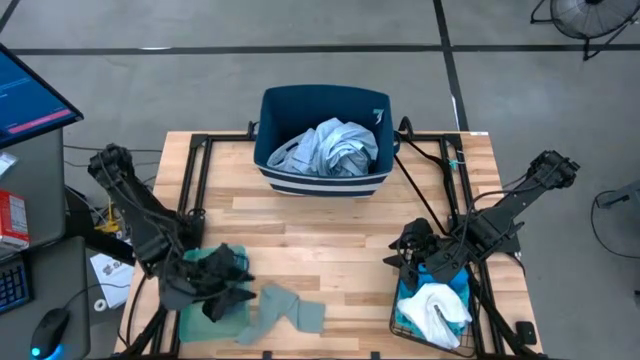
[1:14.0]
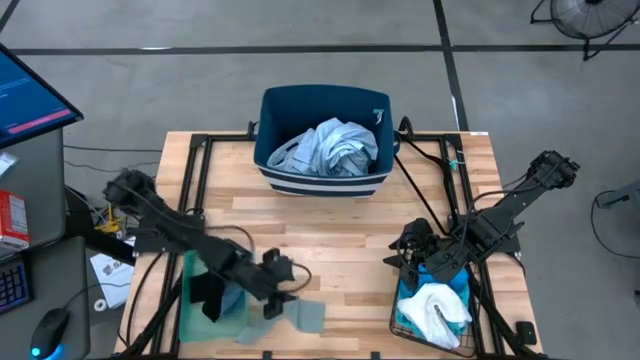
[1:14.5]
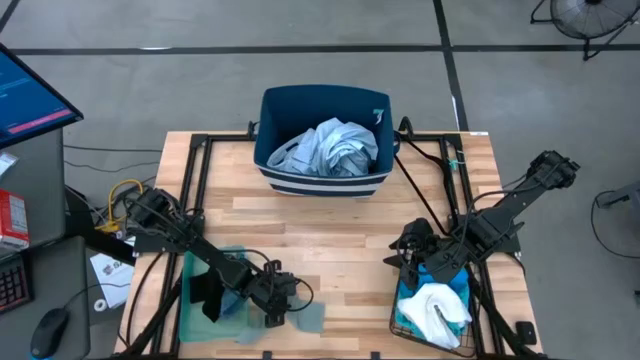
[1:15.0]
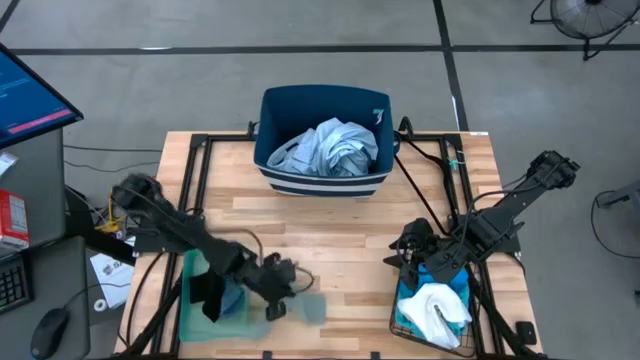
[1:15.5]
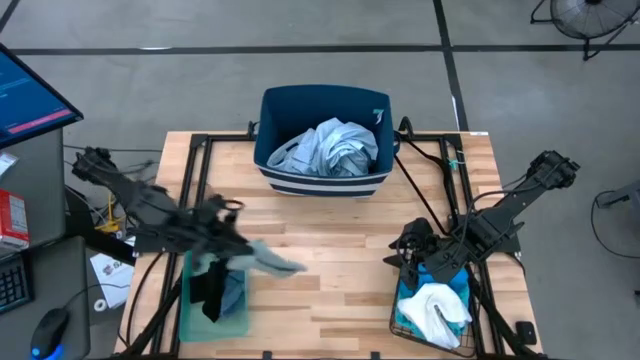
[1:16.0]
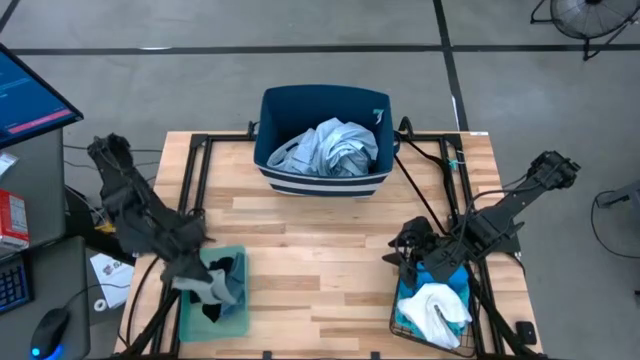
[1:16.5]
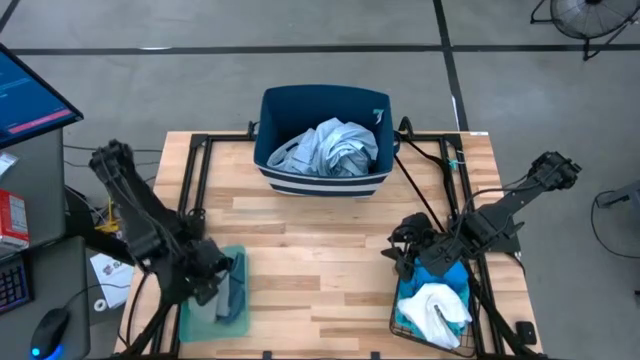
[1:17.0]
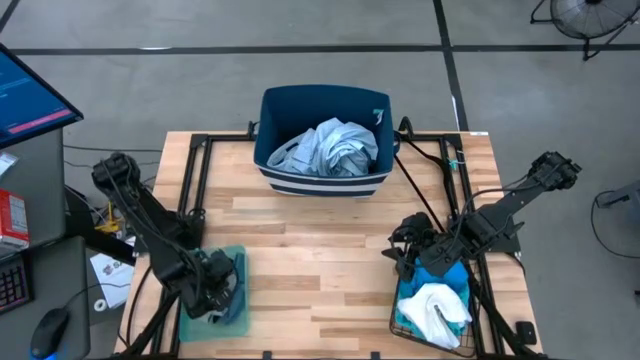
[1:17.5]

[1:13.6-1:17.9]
Task: Pick & Place Cloths
Put the gray sock into the green bin

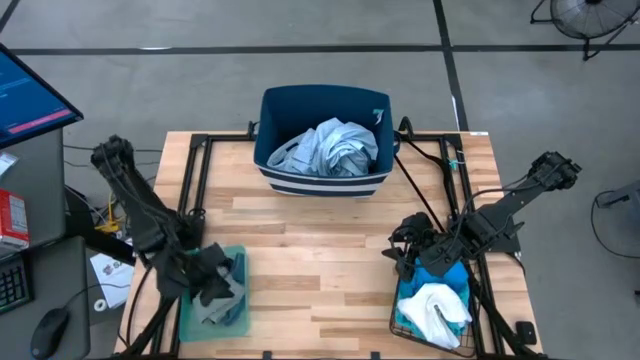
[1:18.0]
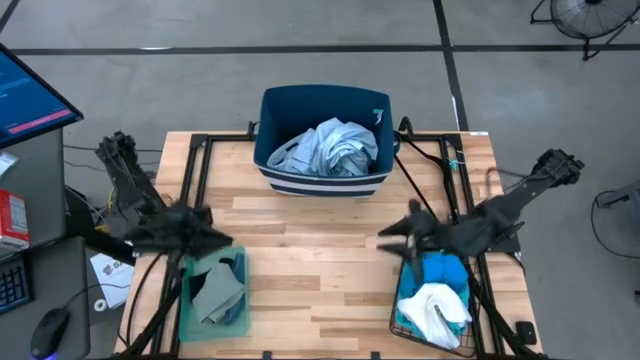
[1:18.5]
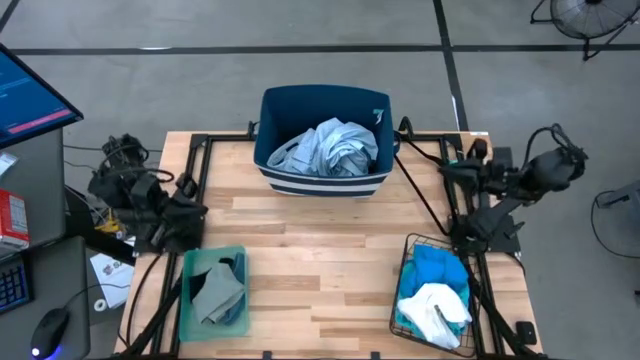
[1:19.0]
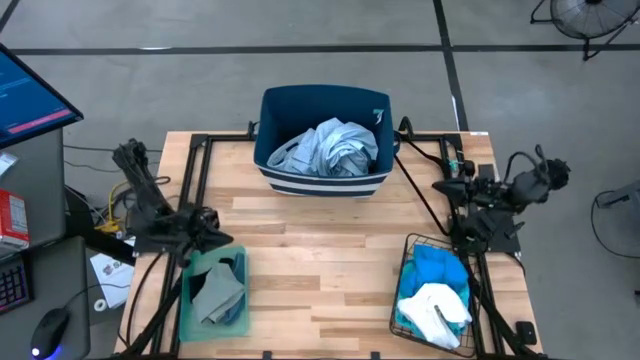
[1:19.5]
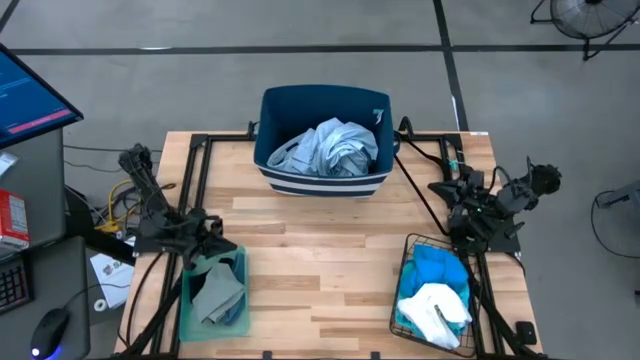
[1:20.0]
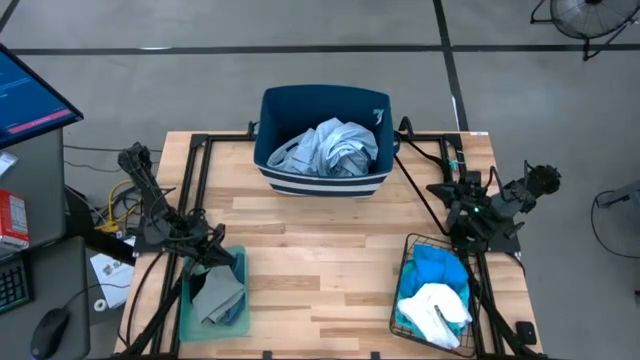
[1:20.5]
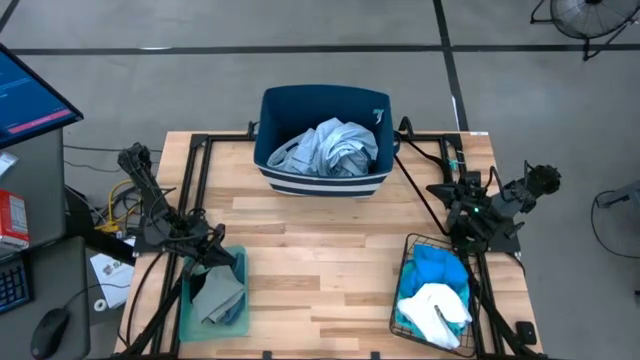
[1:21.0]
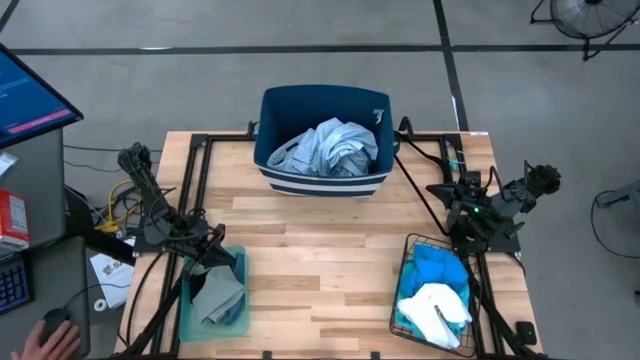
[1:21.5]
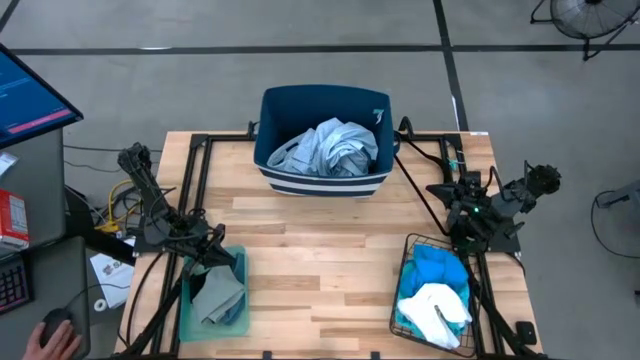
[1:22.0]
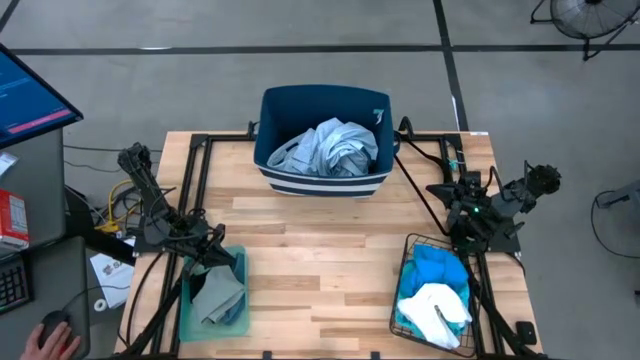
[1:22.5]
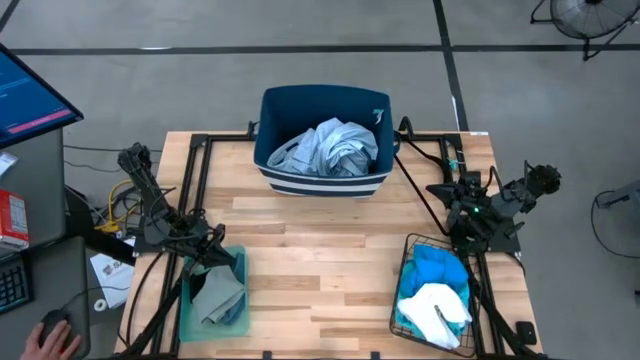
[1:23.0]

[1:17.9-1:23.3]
Return to Home Position

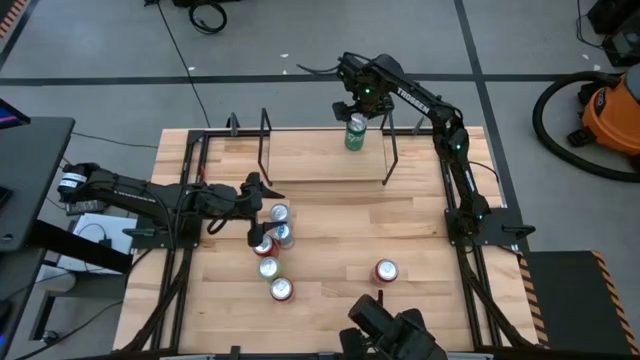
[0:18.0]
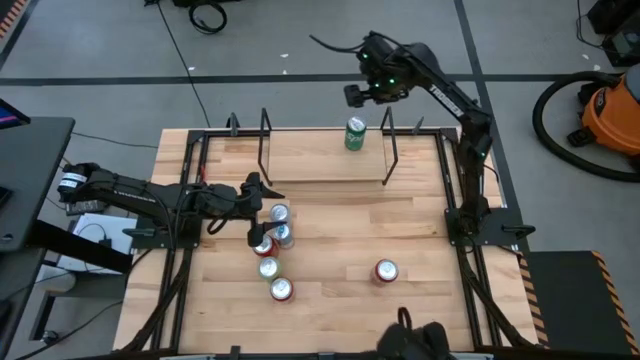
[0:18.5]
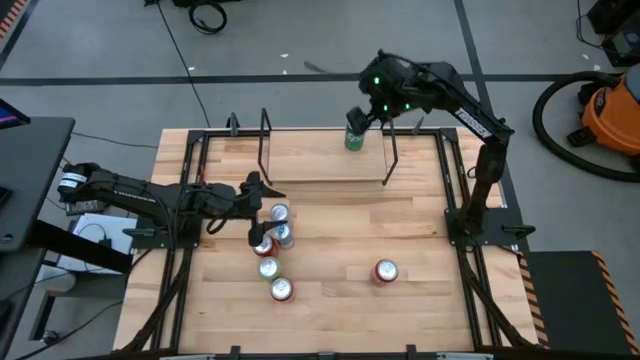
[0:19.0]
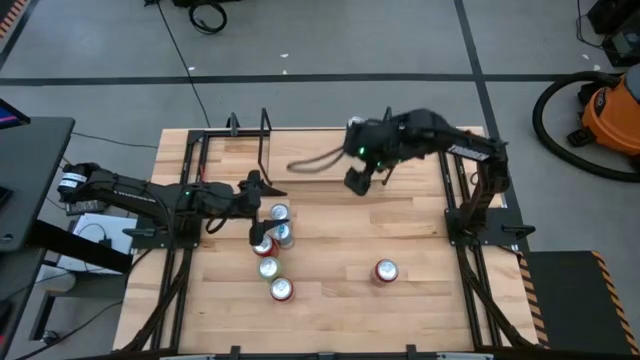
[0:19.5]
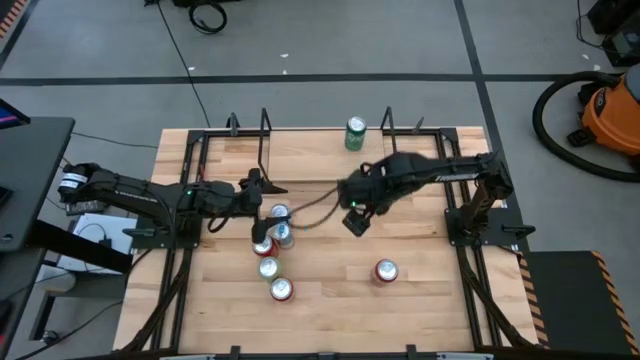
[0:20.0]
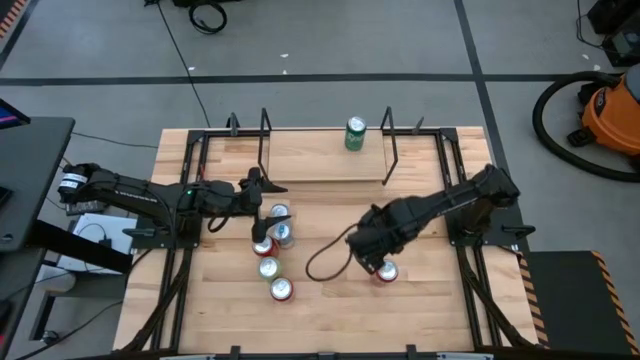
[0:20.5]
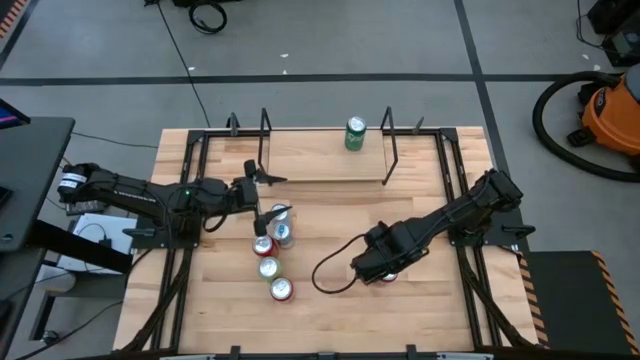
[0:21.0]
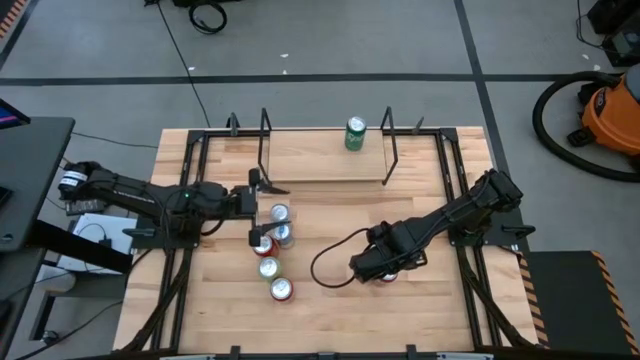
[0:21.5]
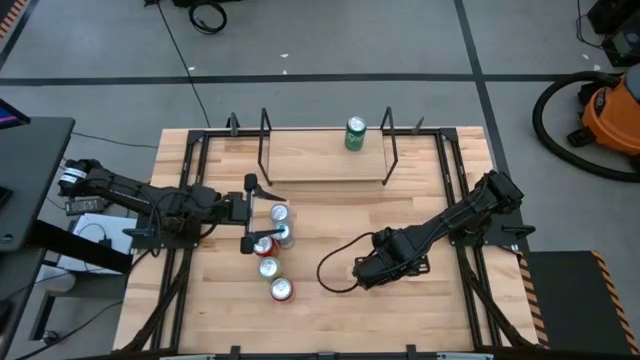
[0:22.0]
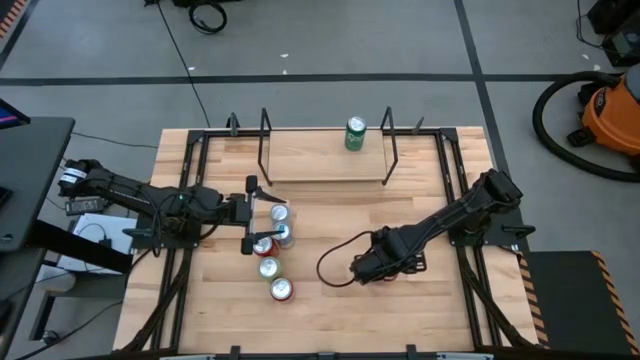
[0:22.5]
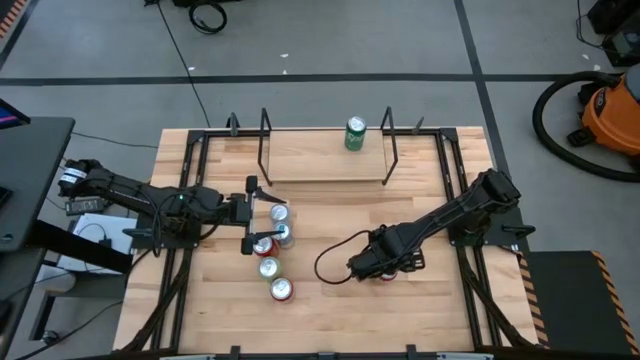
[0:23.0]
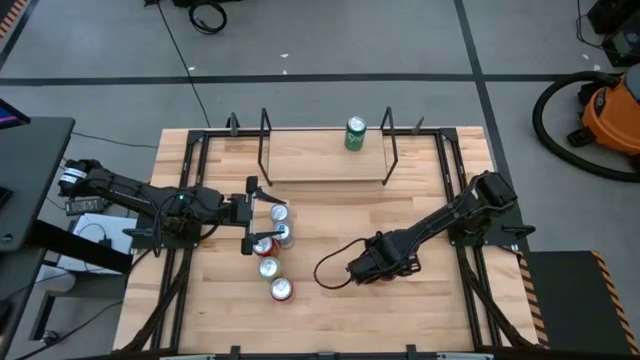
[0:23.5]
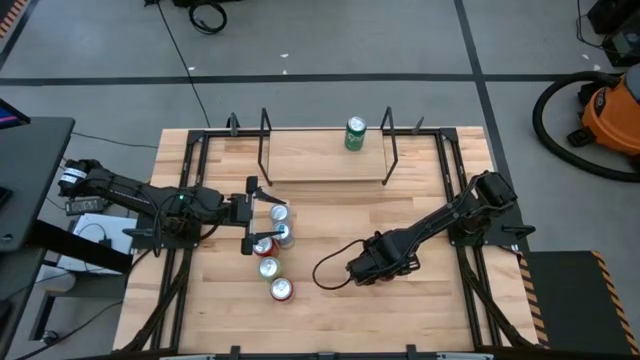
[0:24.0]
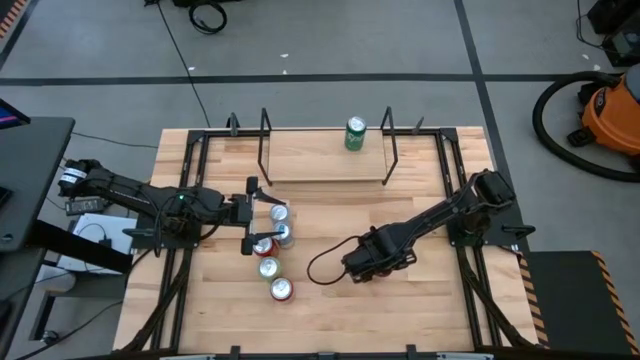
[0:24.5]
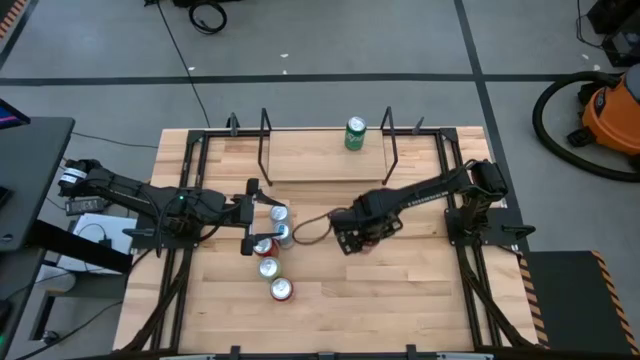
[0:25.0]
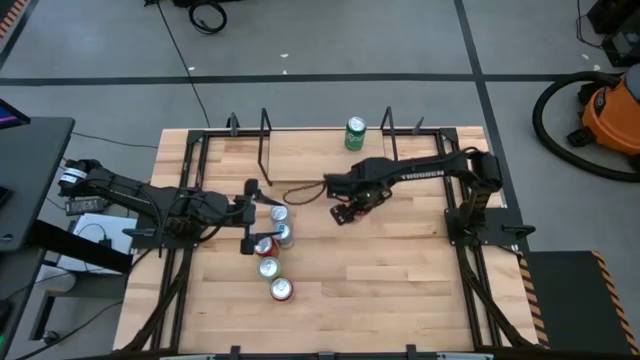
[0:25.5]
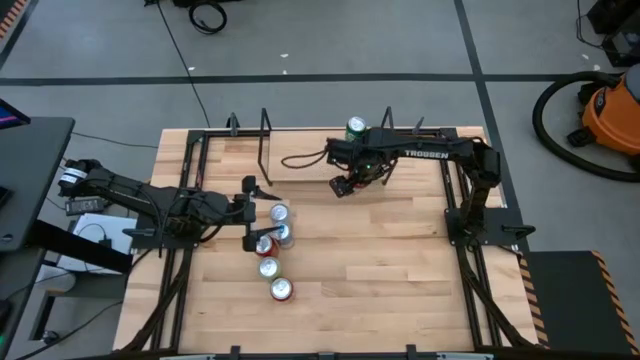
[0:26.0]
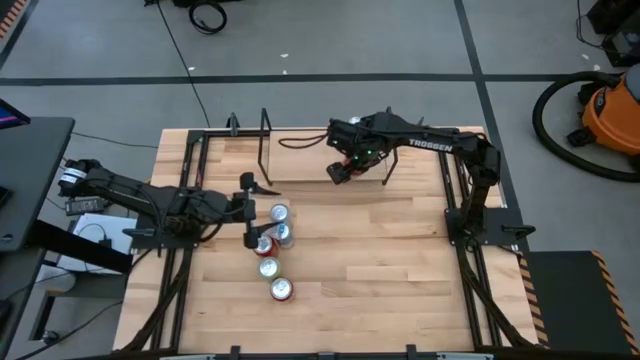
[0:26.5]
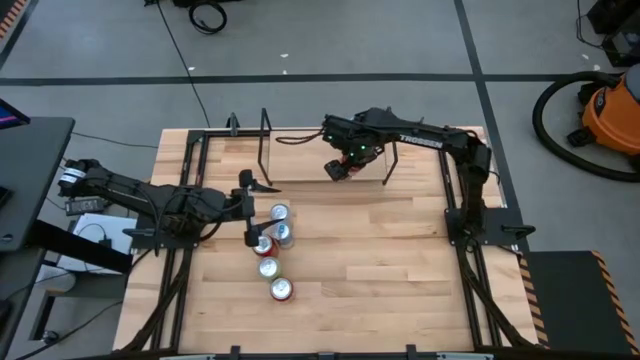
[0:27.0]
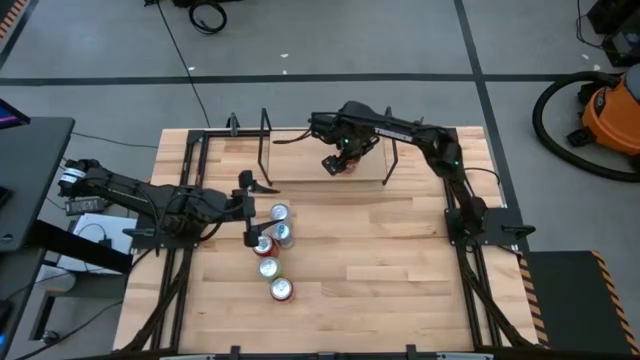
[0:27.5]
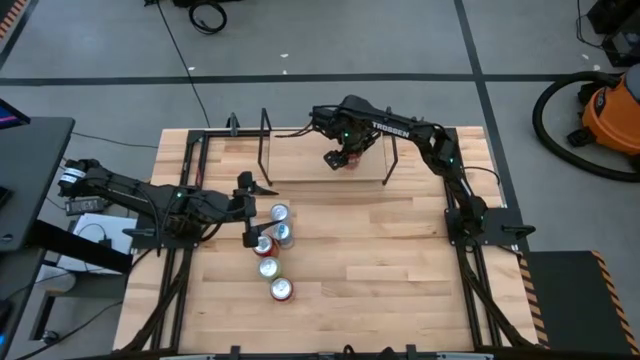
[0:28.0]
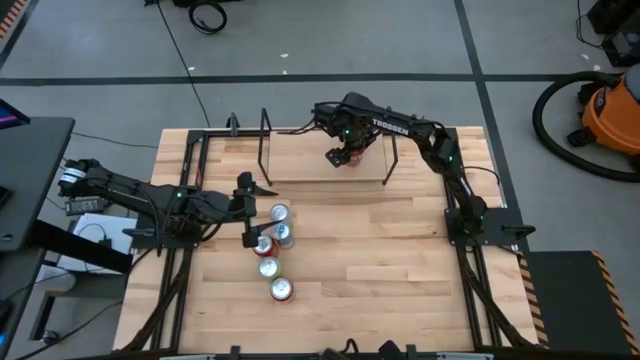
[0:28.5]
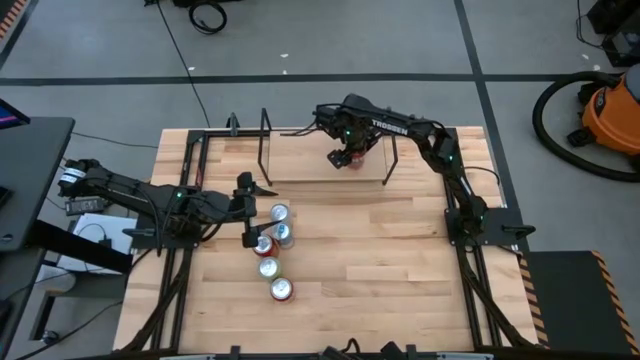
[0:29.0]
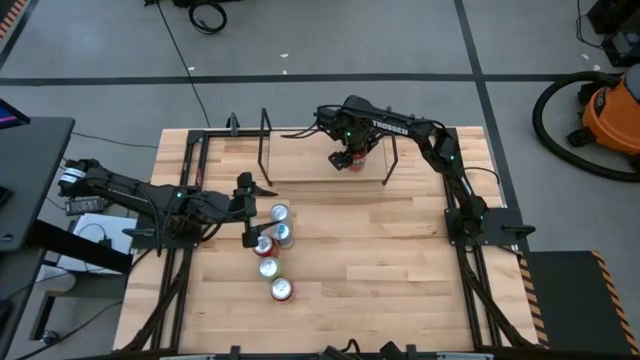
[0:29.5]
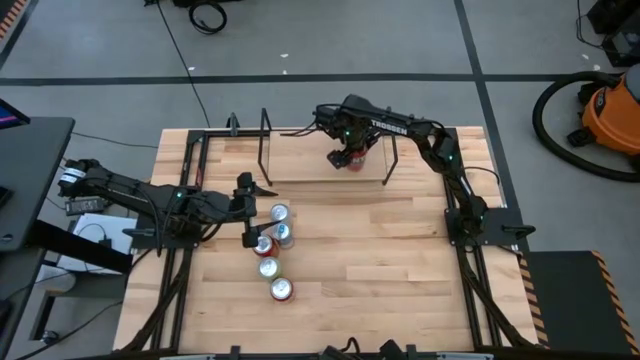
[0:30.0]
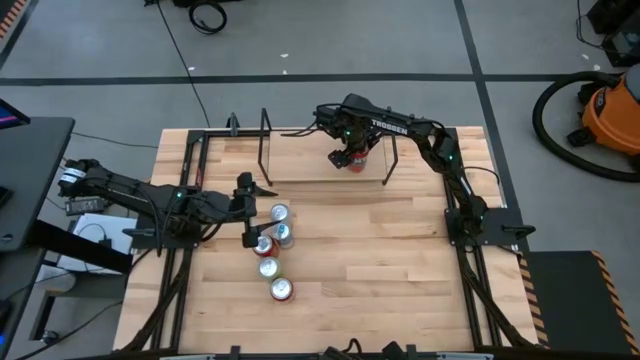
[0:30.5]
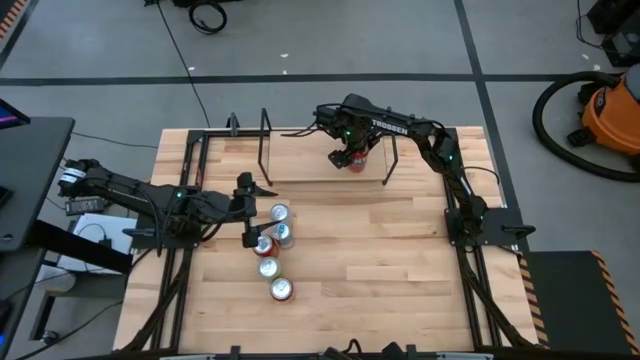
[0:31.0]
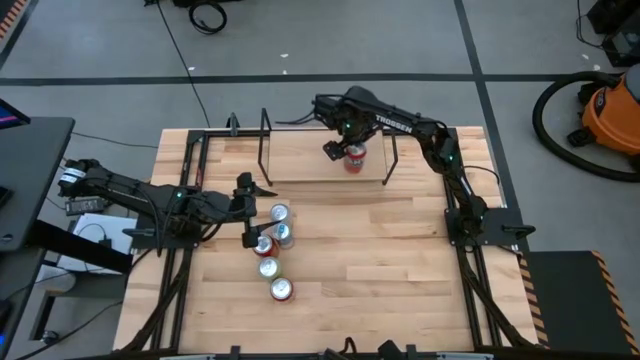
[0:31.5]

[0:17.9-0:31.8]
Task: Place canned beverage on shelf
Put the right red soda can on the shelf
